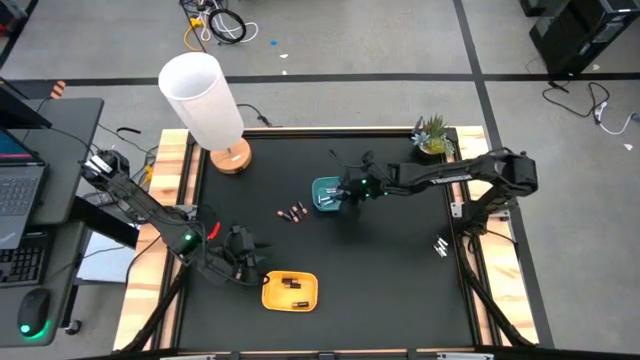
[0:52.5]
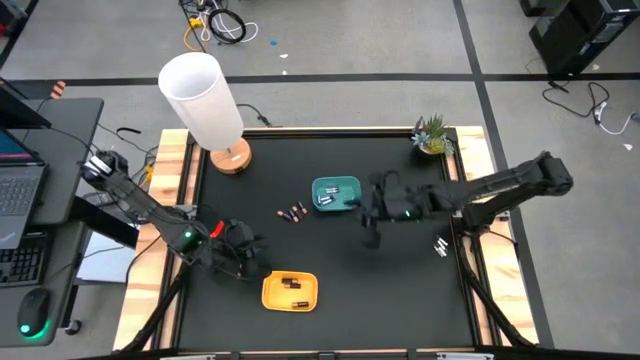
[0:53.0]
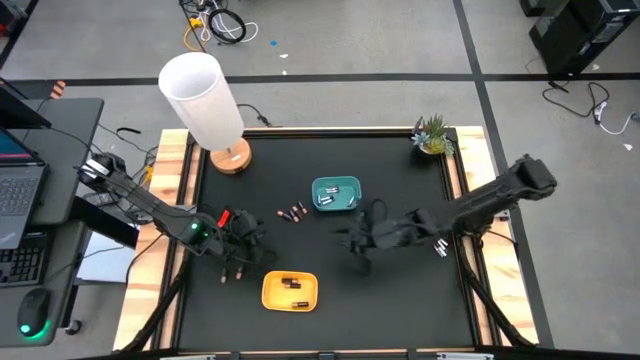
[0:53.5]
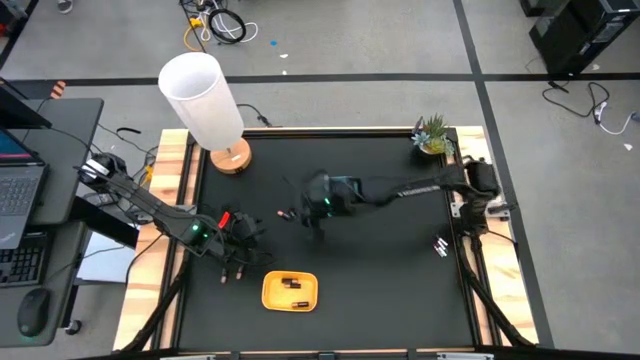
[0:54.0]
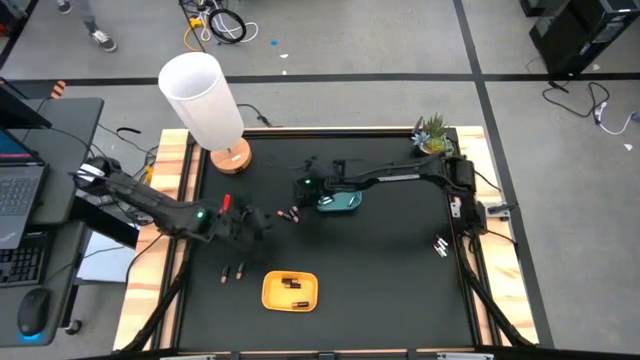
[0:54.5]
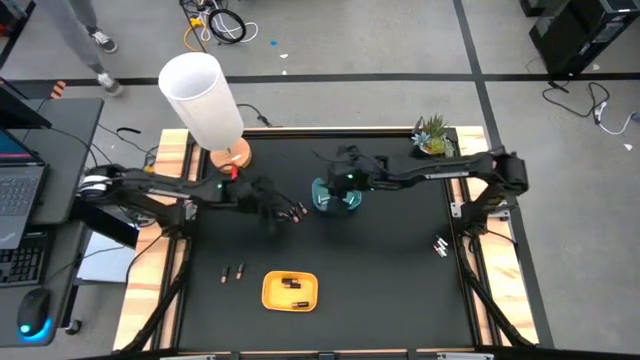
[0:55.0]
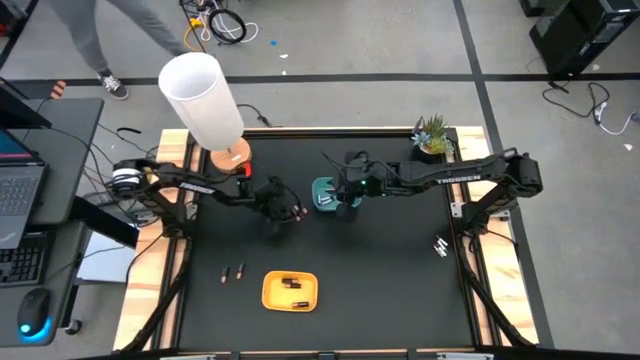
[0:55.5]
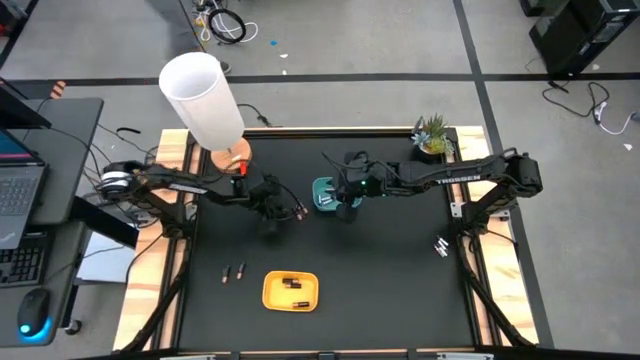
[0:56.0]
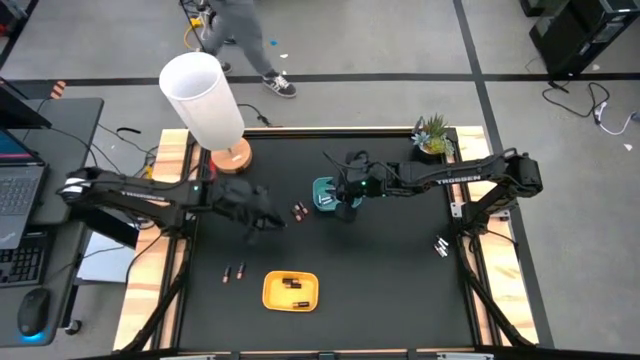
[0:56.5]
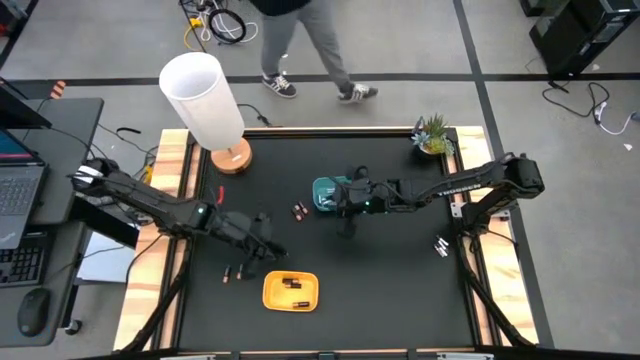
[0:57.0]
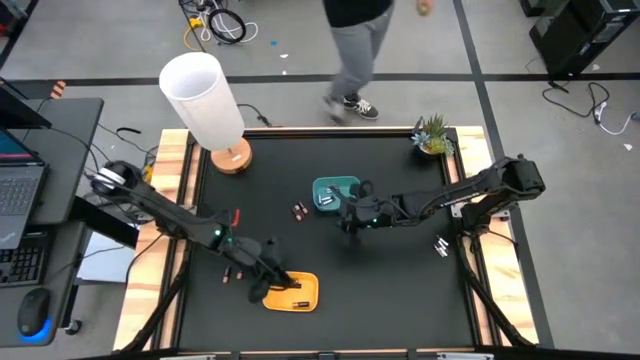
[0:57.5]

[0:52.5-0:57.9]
Task: Sort batteries
Put the black battery into the yellow bin

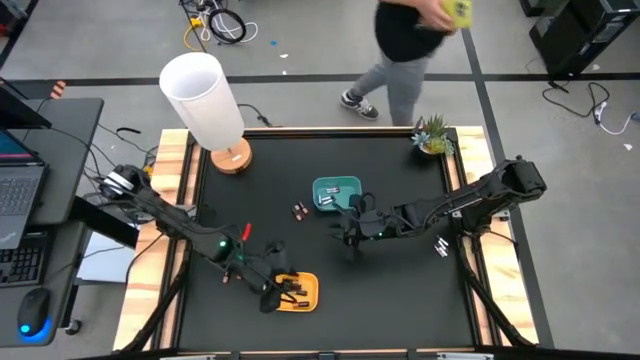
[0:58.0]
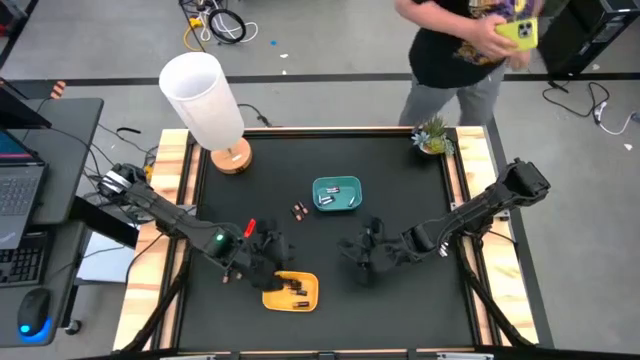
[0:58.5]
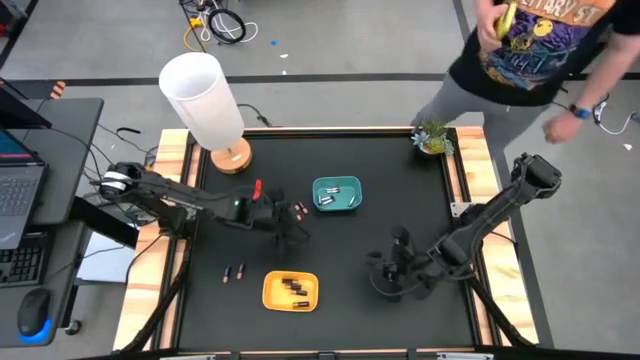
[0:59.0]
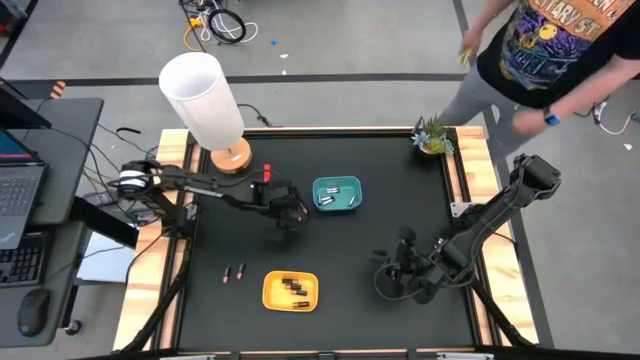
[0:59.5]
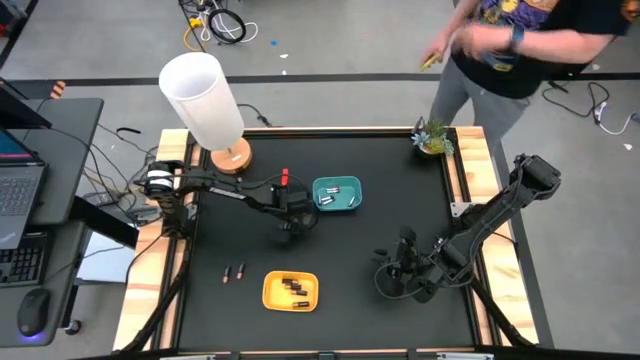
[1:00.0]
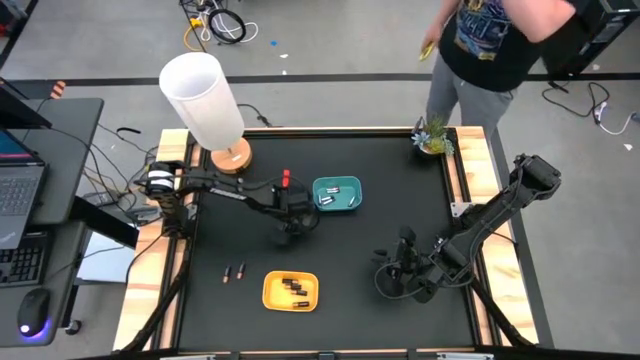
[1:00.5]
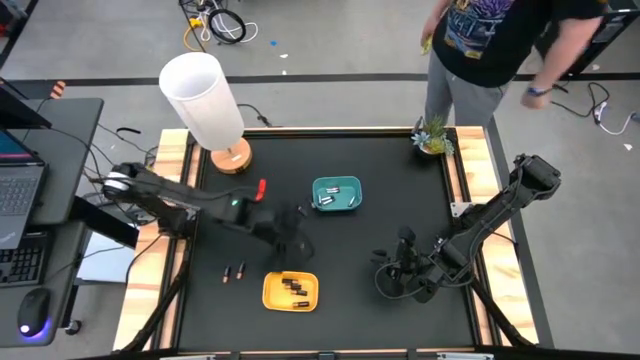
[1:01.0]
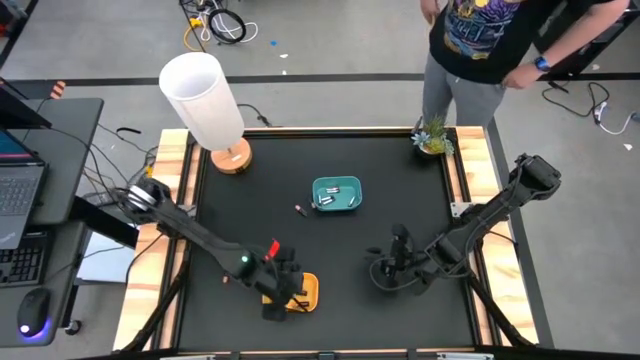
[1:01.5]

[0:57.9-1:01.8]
Put the black battery into the yellow bin

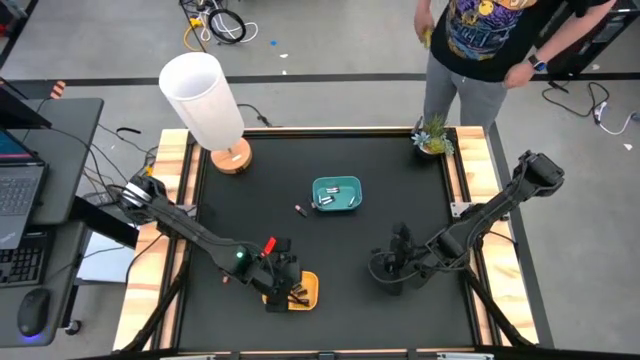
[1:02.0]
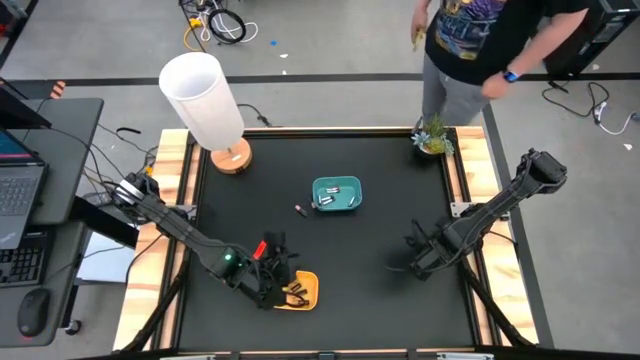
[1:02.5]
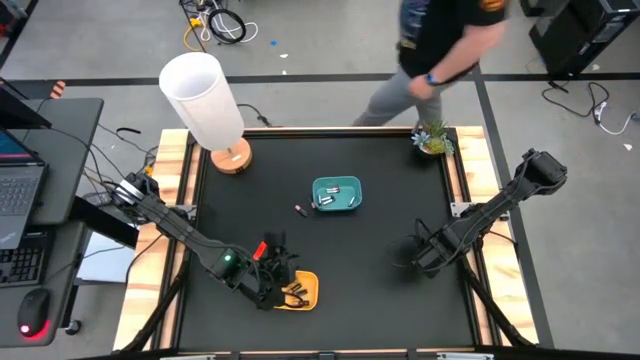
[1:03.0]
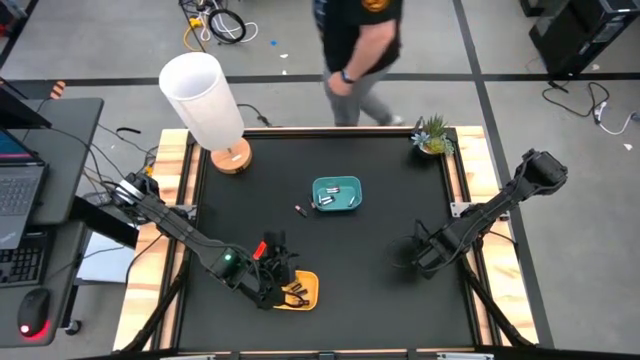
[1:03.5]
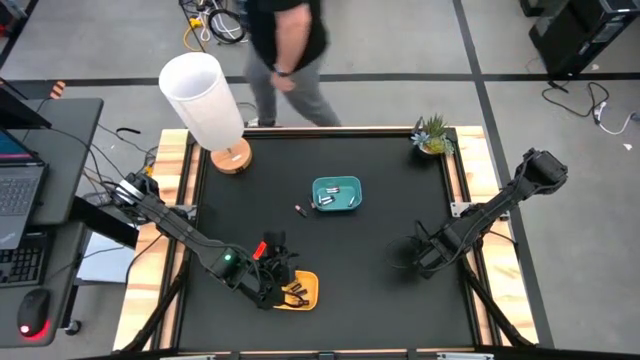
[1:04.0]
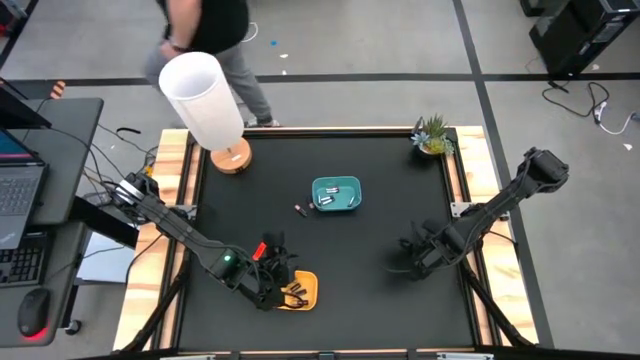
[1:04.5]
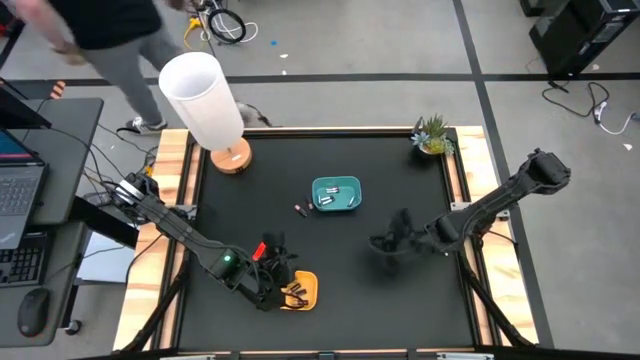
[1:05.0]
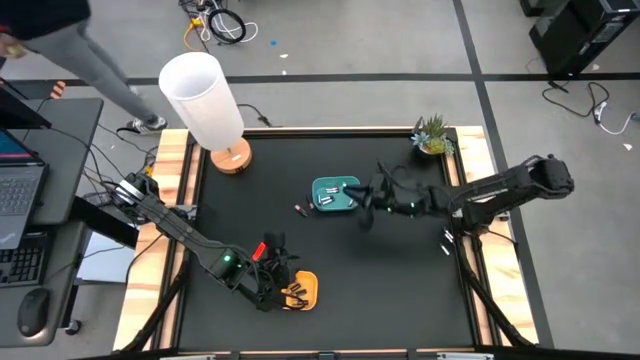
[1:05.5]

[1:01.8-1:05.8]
Put the silver battery into the blue bin

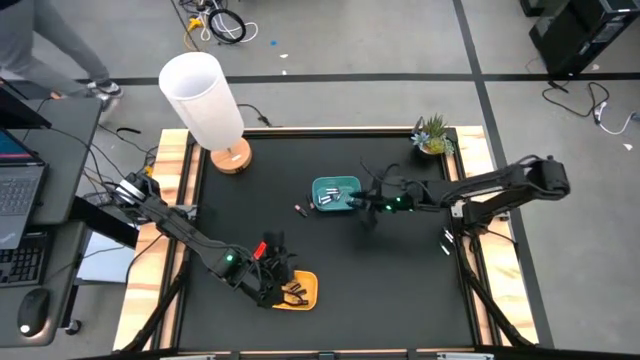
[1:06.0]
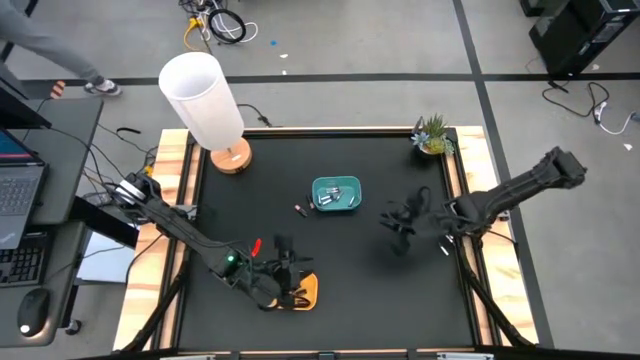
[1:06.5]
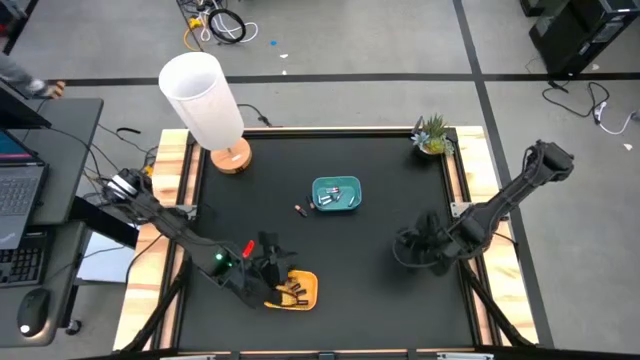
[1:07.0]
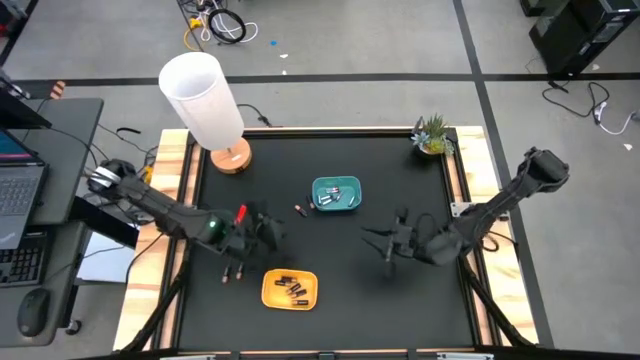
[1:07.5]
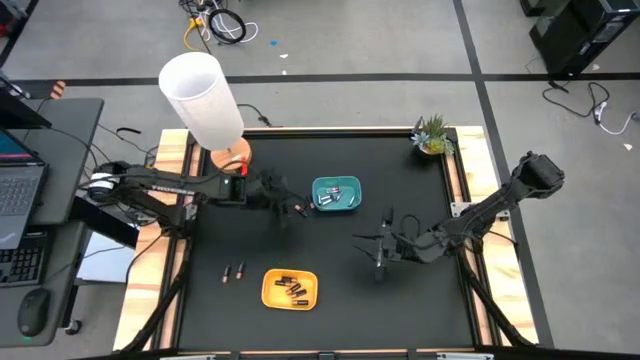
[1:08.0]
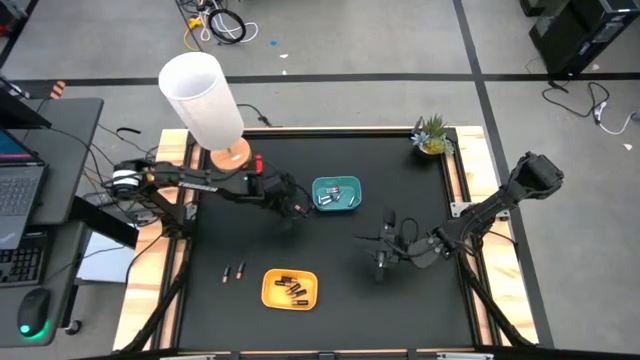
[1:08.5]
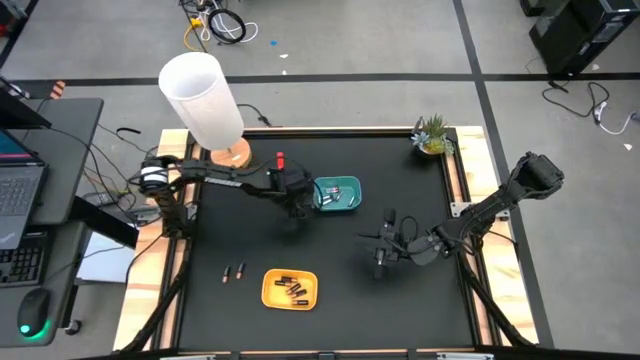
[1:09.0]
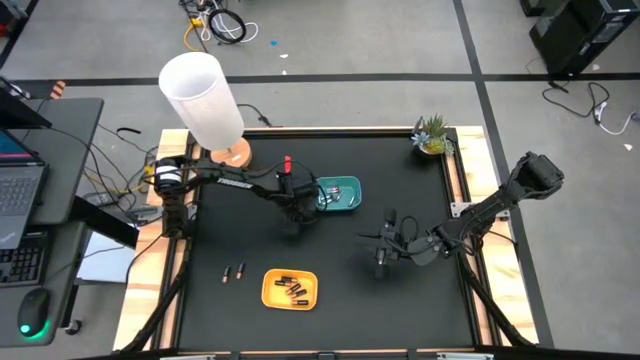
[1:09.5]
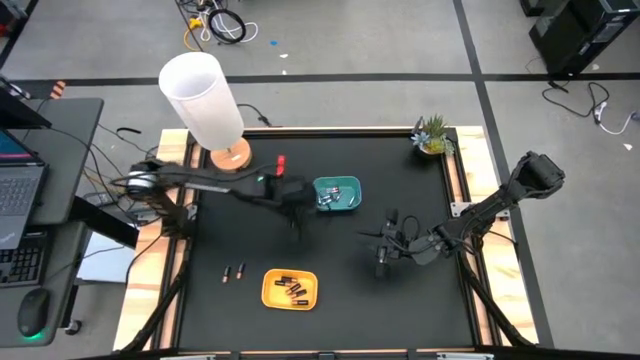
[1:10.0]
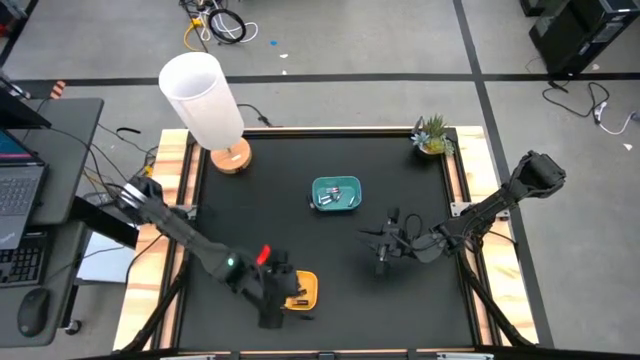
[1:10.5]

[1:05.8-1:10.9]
Put the black battery into the yellow bin

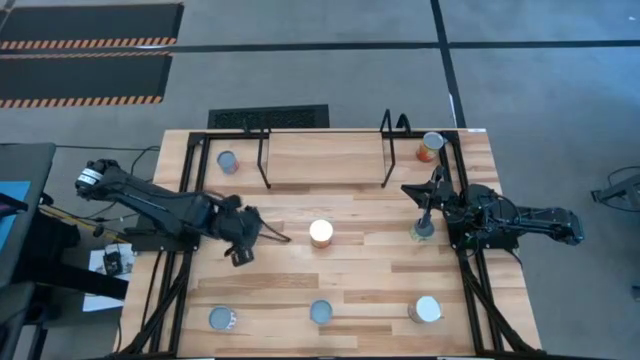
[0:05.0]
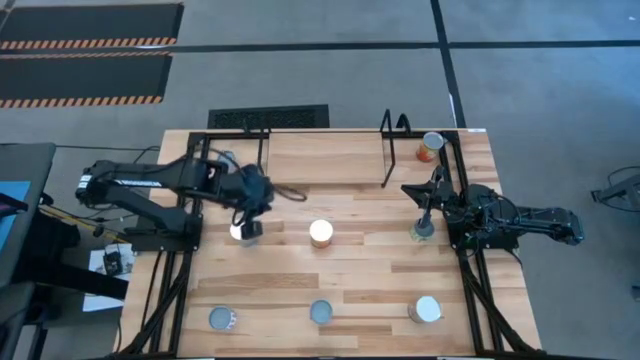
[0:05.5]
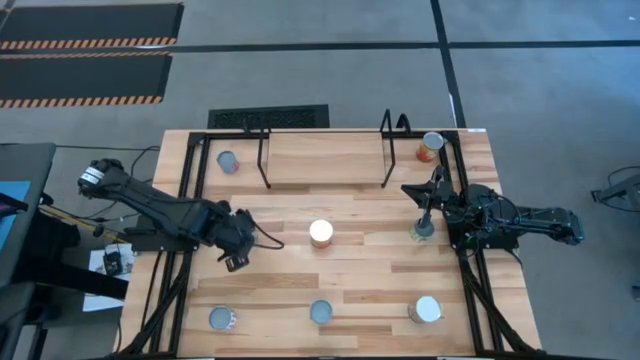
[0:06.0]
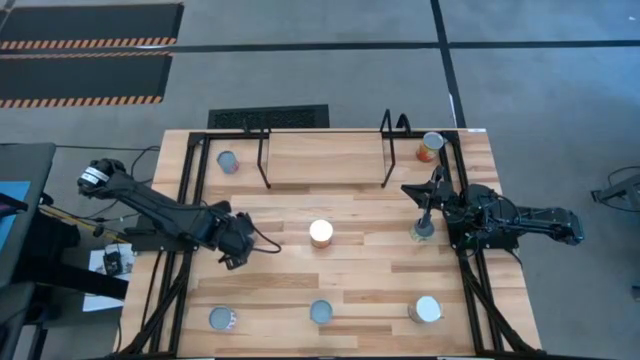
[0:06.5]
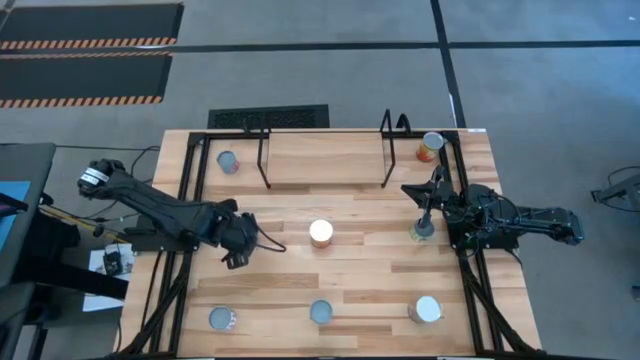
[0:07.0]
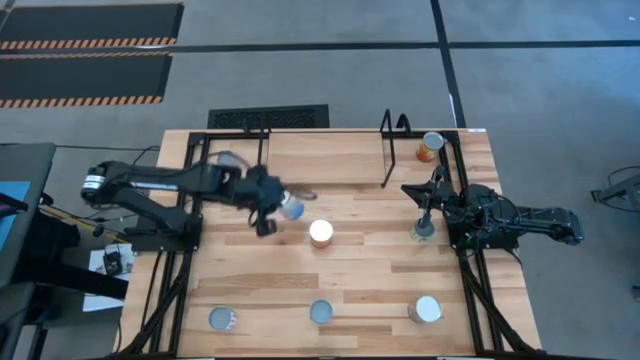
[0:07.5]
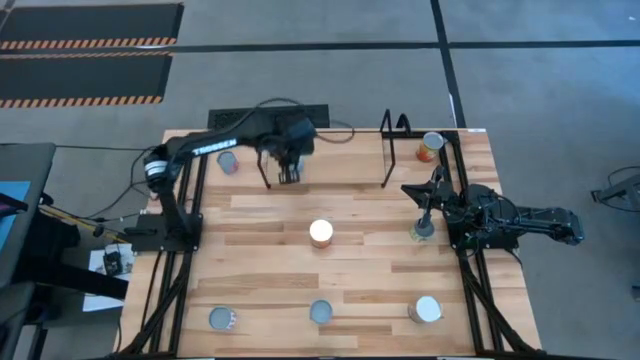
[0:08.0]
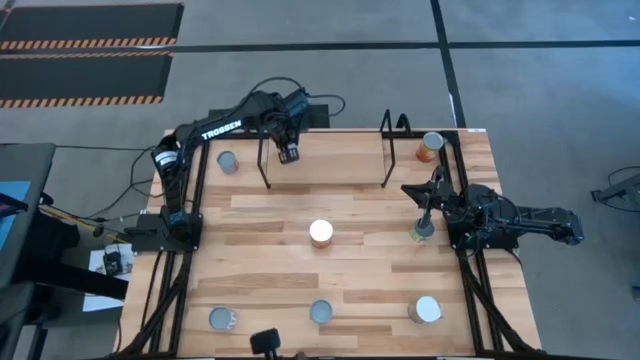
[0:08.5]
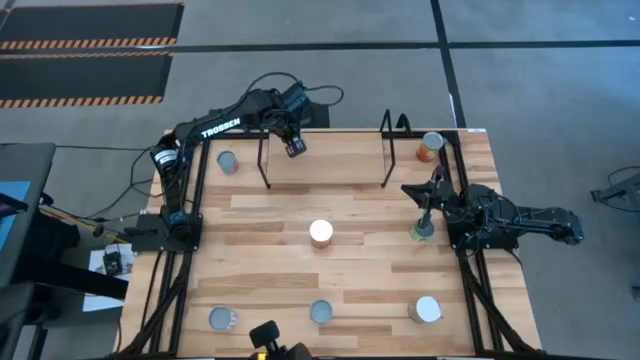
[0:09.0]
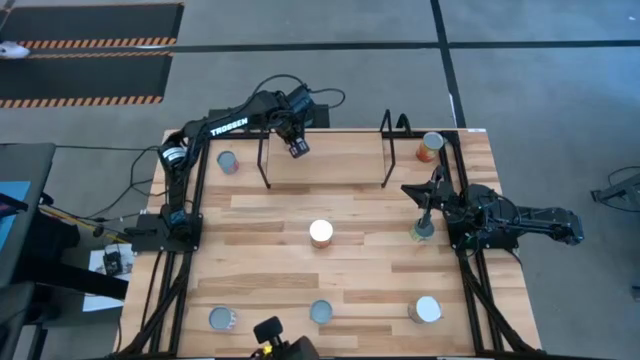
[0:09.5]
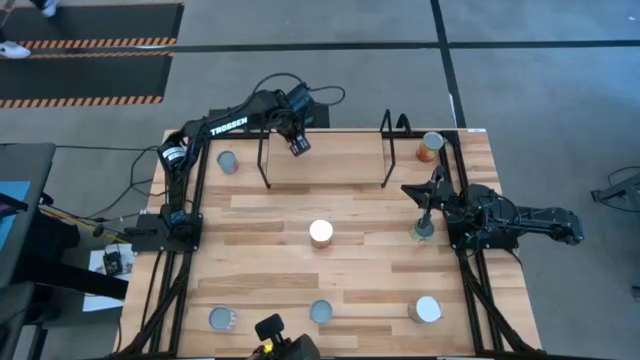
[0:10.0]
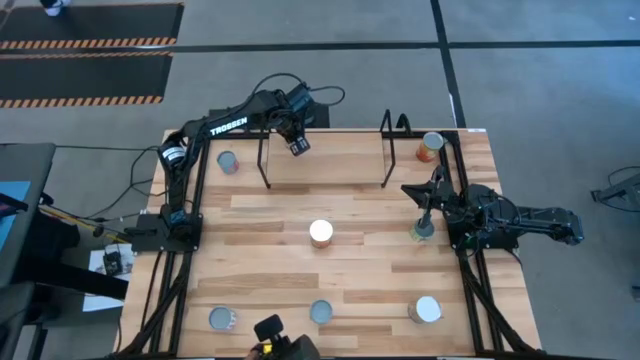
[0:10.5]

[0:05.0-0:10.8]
Task: Pick and place cans onto a shelf
Put the left canned peaches on the shelf
